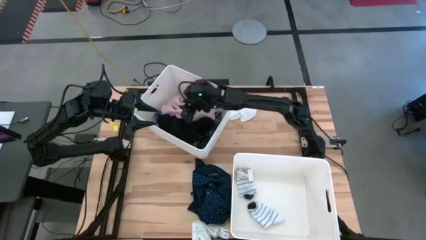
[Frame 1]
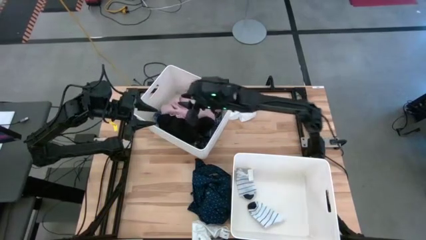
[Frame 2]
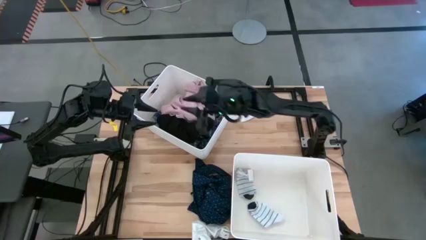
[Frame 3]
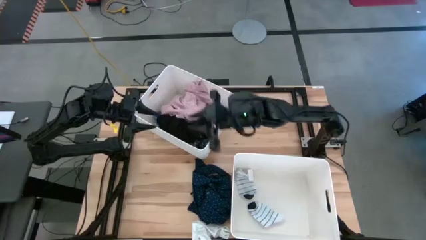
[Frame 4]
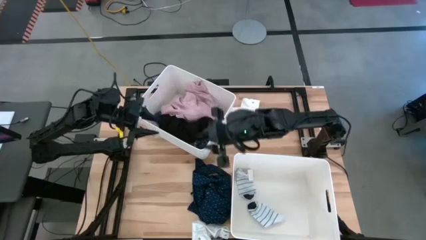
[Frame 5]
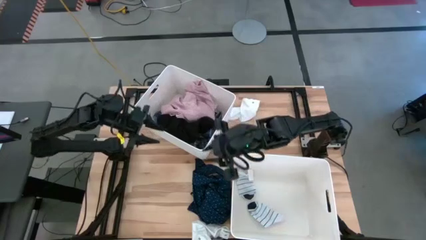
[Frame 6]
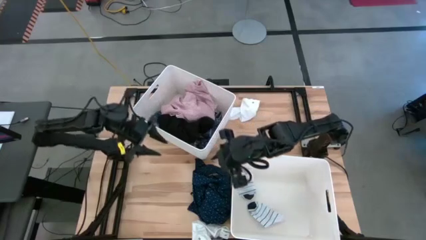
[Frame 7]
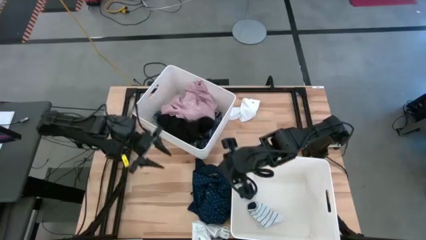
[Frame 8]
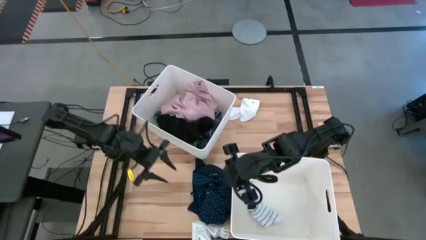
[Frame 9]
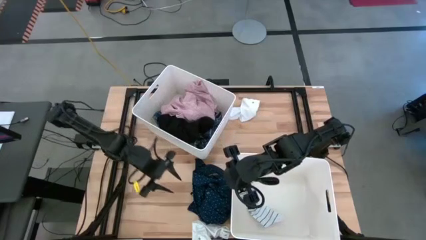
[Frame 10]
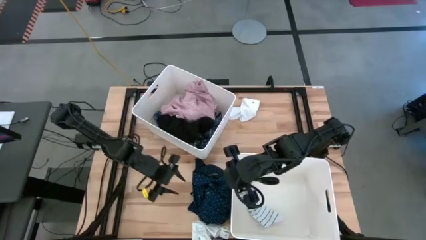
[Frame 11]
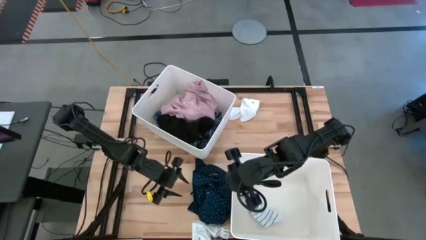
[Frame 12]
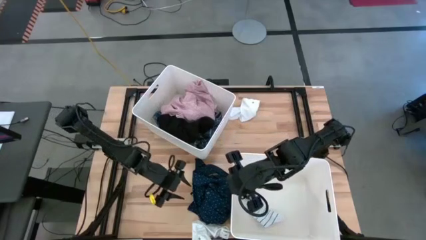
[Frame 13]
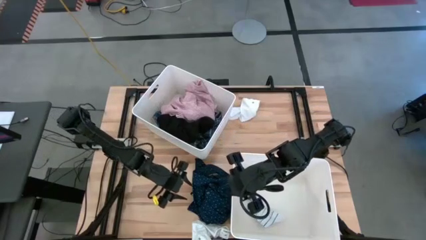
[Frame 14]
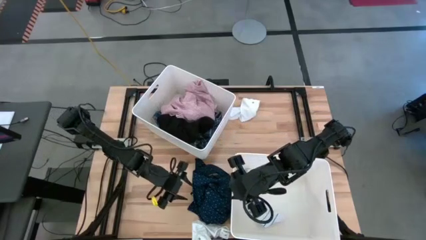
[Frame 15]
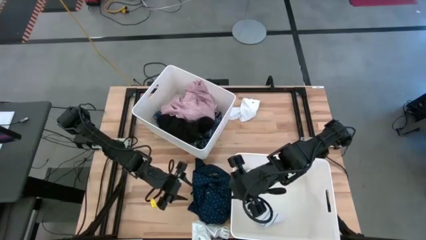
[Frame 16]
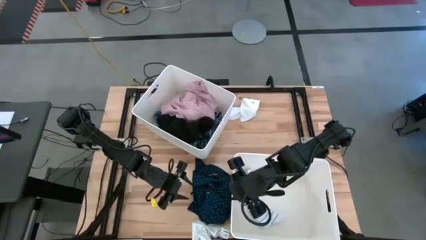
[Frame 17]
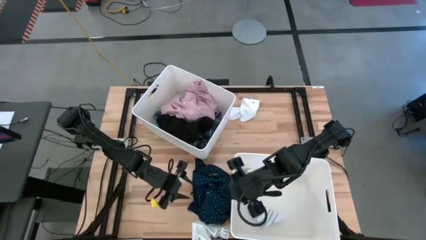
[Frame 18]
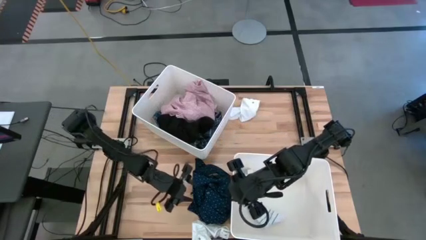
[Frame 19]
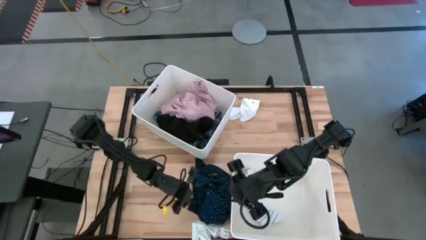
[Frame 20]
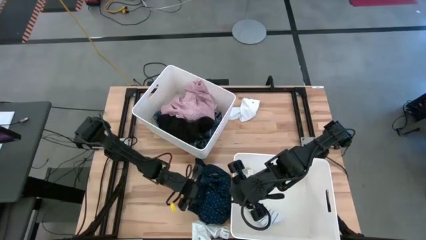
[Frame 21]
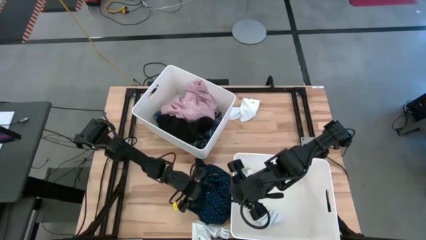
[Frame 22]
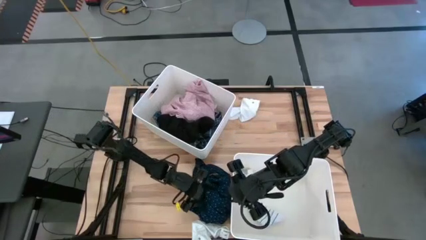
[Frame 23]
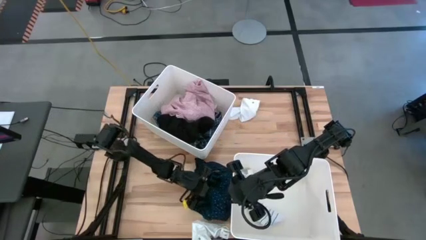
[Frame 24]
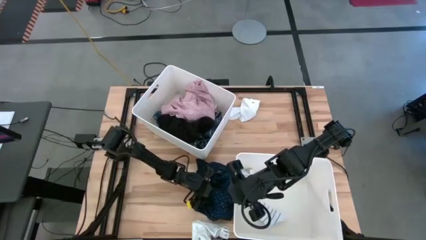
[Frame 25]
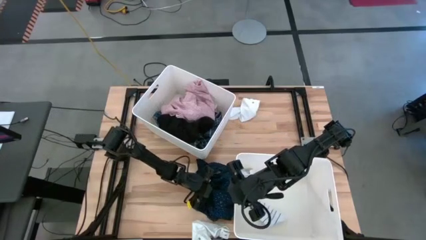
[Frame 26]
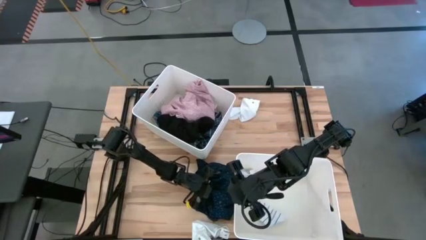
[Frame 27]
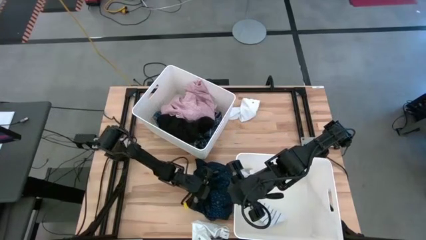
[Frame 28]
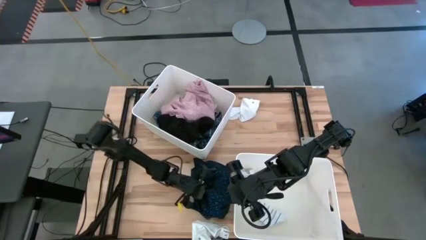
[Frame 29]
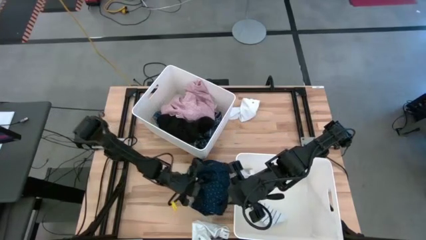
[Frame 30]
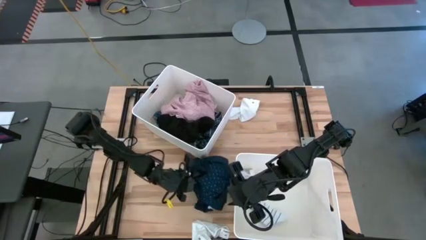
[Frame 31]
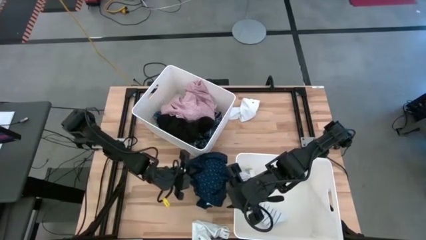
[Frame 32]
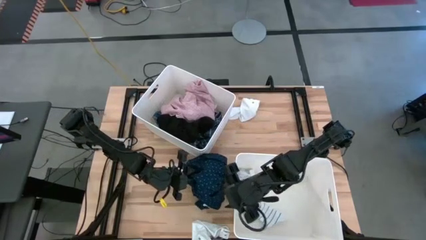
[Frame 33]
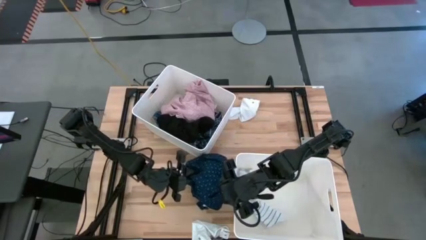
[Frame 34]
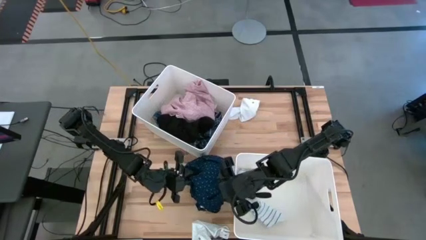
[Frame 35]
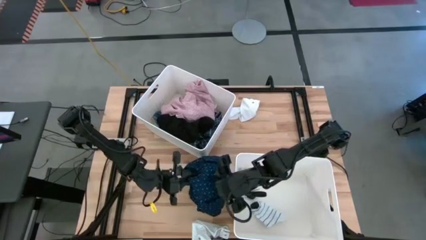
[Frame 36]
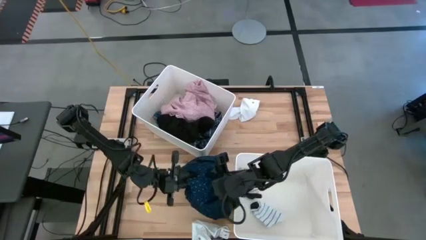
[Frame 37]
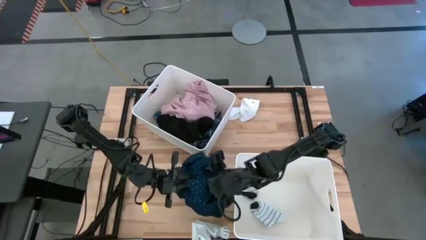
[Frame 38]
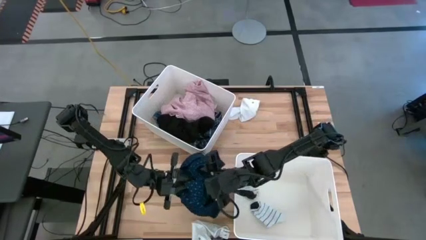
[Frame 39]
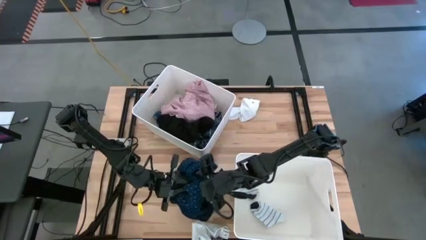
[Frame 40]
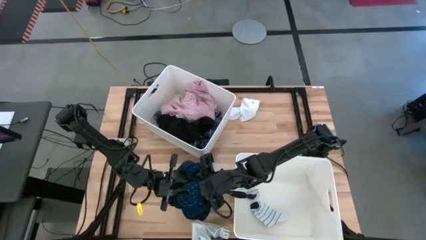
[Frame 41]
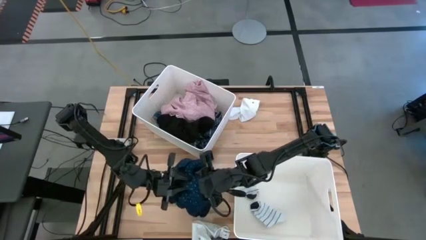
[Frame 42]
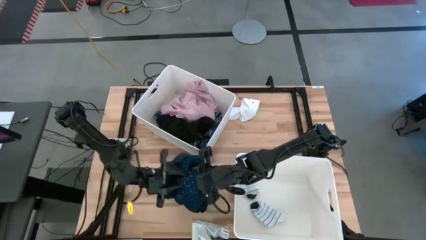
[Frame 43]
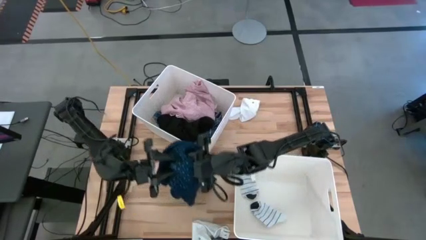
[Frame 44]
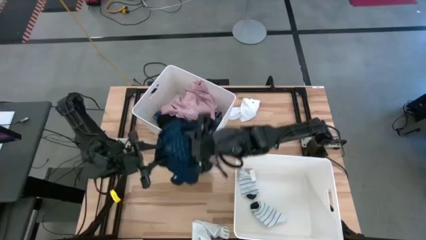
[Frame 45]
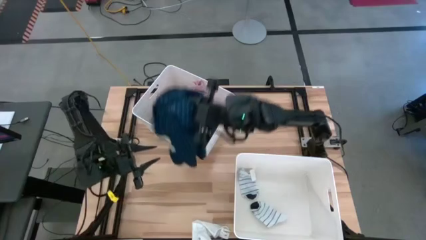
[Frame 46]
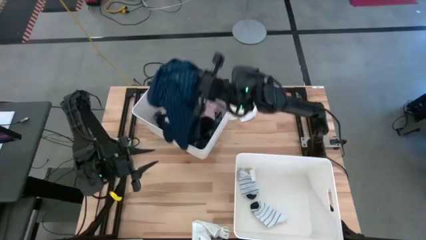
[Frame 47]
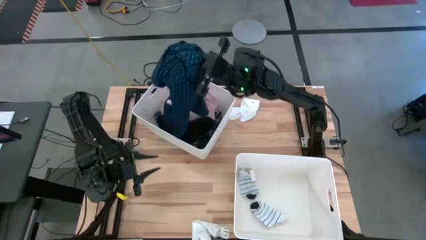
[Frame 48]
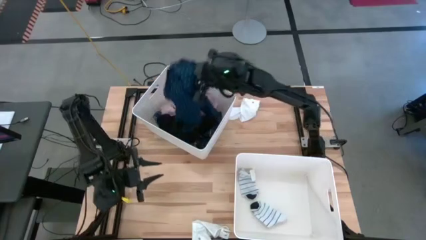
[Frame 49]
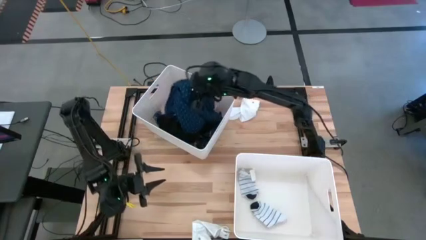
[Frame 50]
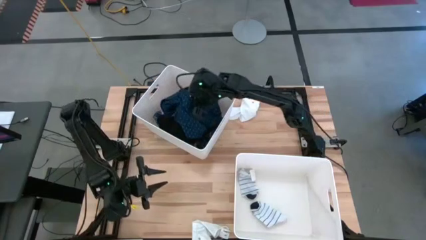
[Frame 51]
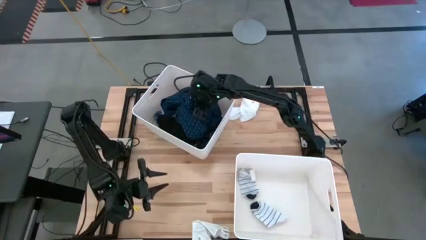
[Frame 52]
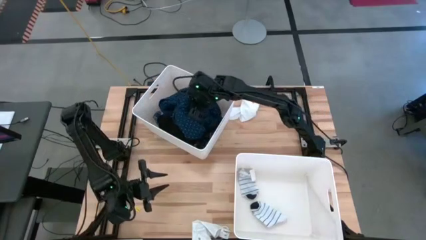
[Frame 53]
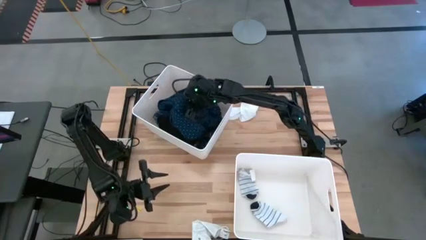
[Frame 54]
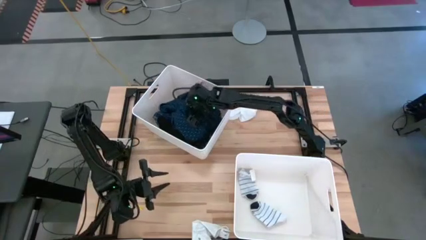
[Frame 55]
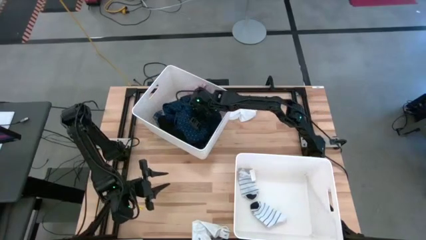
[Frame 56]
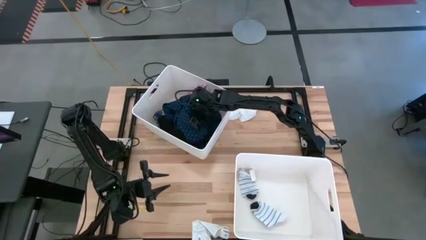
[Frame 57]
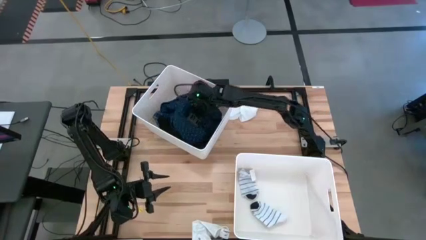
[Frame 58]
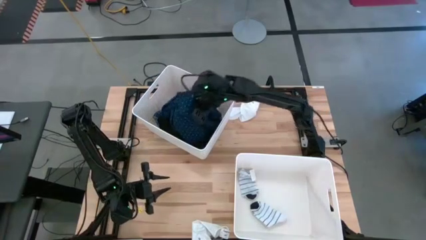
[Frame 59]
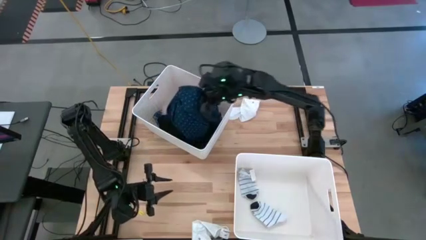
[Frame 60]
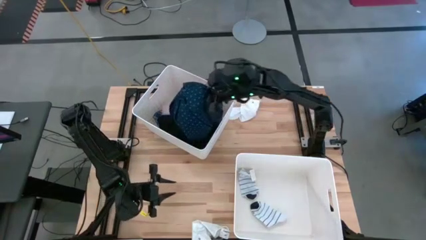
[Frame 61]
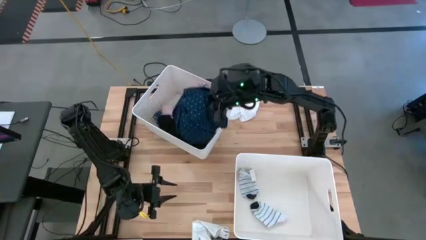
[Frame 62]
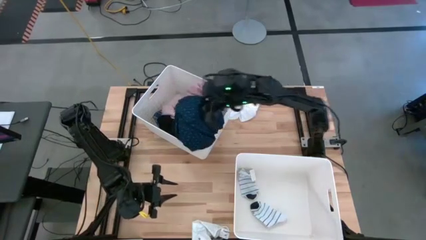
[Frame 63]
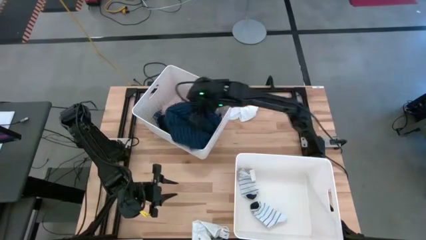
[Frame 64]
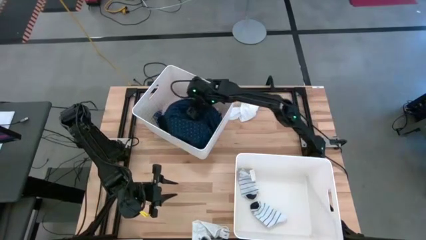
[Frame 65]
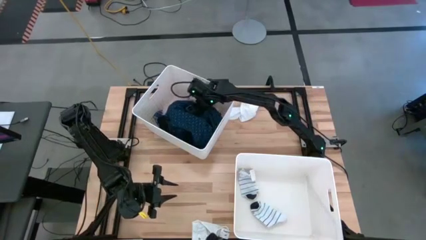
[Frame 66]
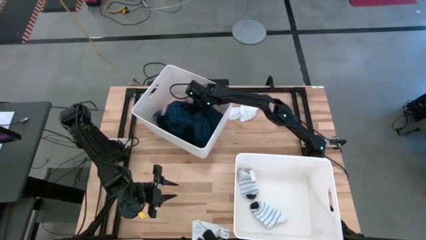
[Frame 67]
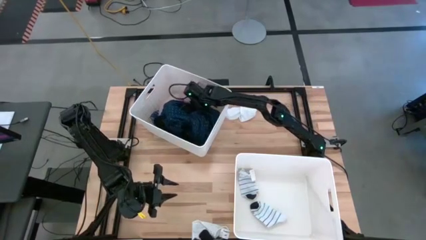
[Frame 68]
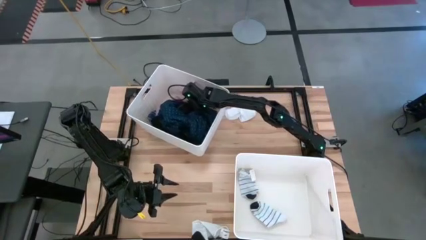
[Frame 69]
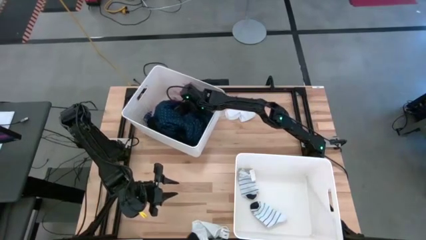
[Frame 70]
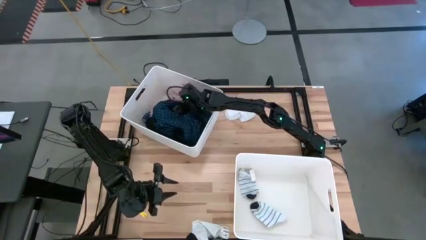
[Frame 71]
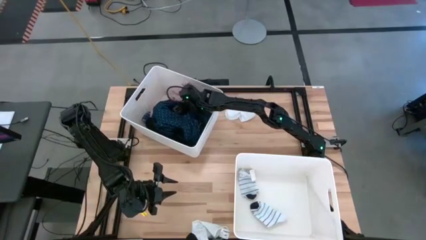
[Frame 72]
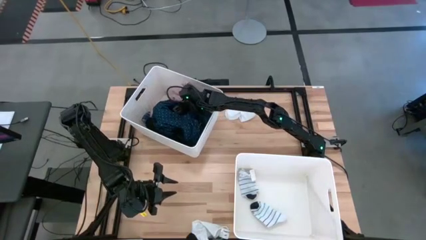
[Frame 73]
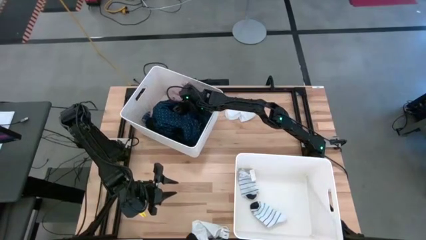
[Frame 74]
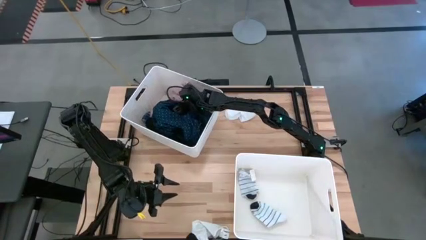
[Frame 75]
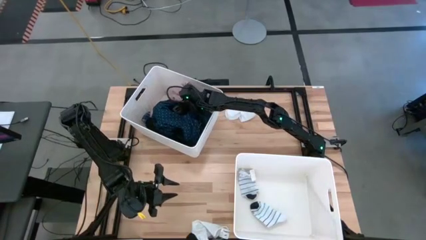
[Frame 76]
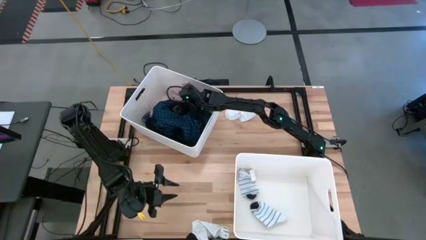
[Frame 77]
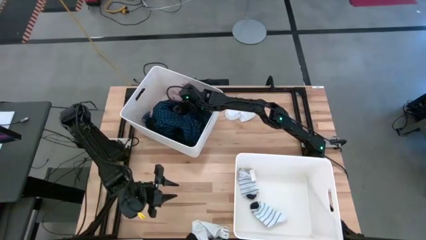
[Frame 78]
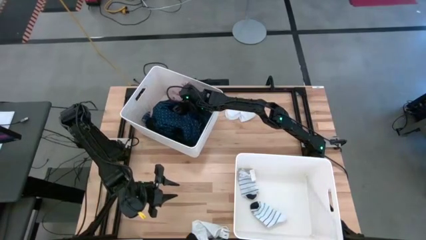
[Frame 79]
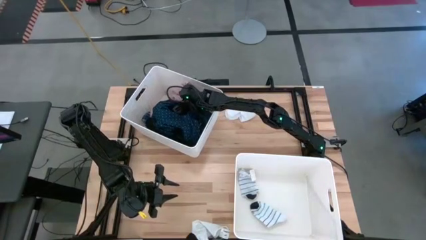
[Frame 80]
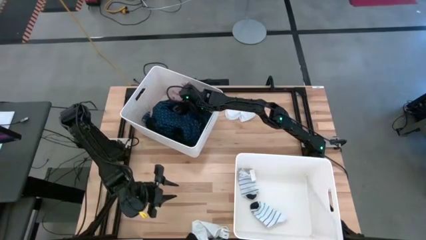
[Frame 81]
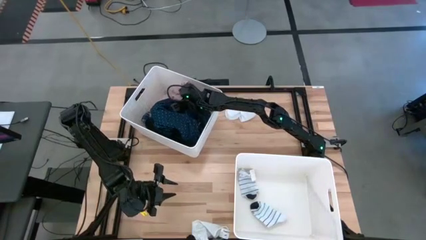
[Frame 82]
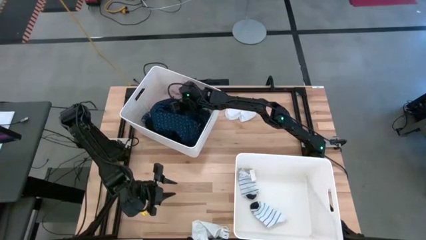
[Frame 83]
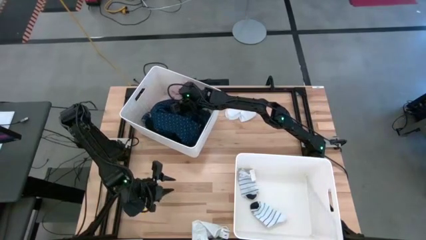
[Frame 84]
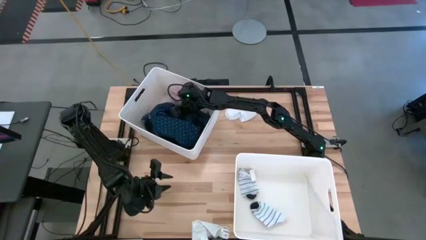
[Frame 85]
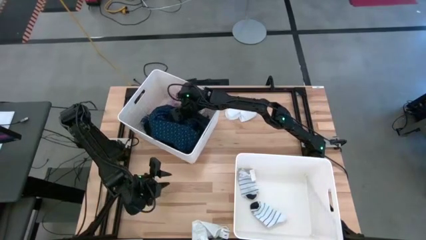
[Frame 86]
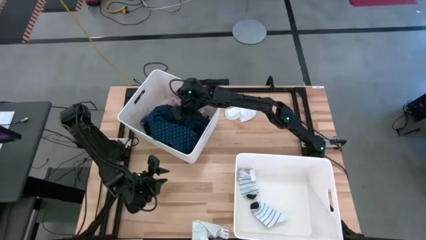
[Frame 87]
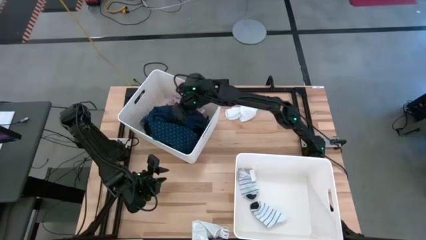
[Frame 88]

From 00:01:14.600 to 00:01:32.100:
Task: Sort clothes
Put the dark blue circle dotted polo shirt into the top white laundry bin
